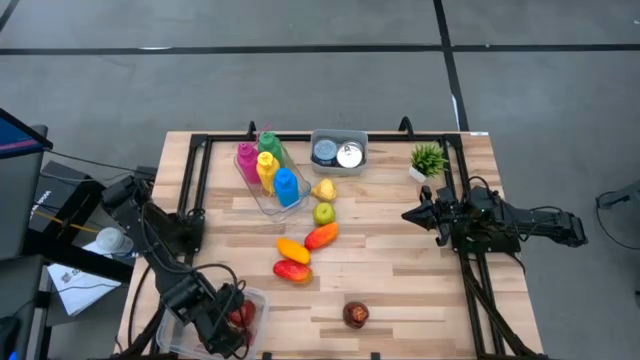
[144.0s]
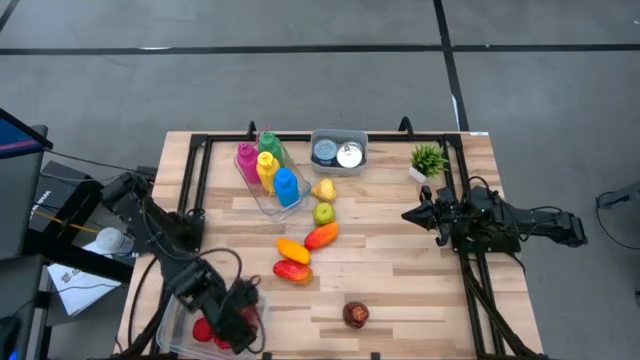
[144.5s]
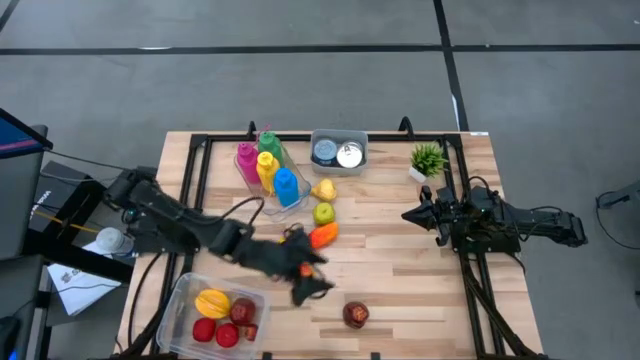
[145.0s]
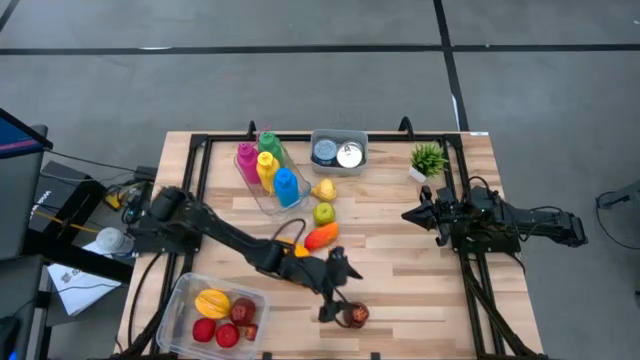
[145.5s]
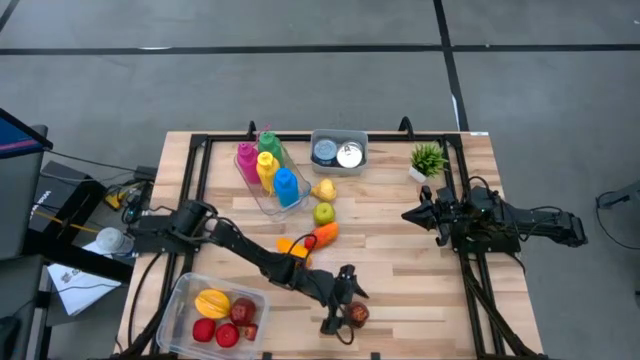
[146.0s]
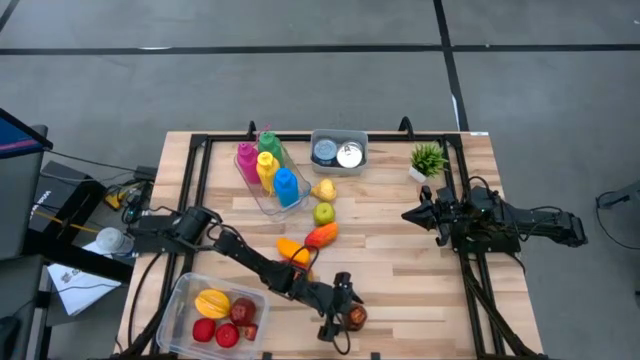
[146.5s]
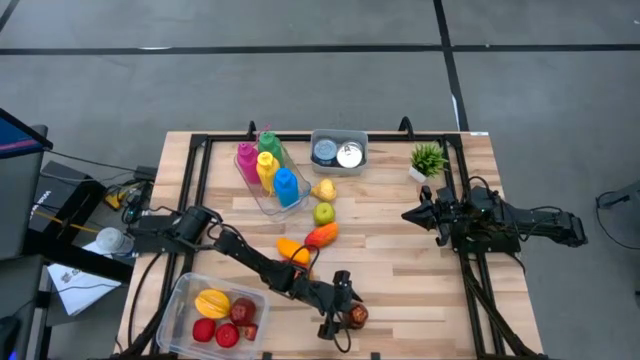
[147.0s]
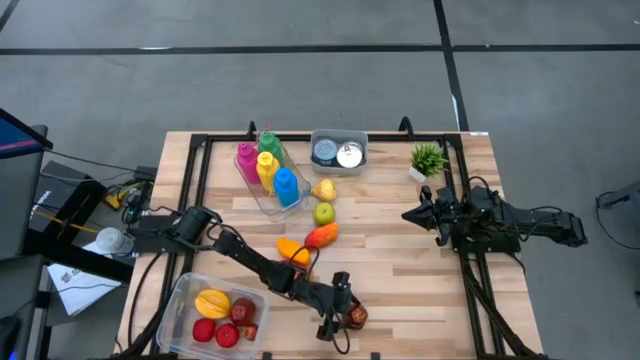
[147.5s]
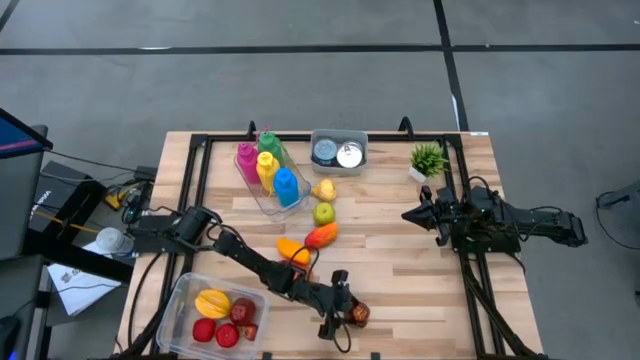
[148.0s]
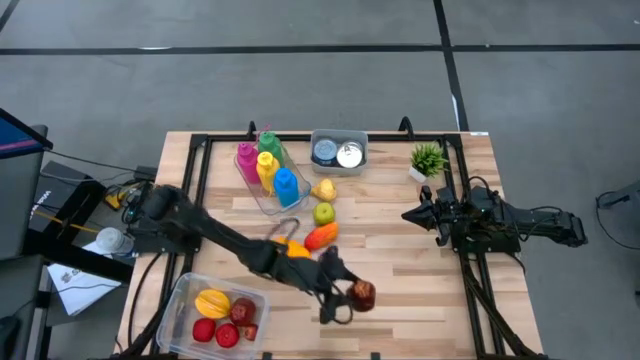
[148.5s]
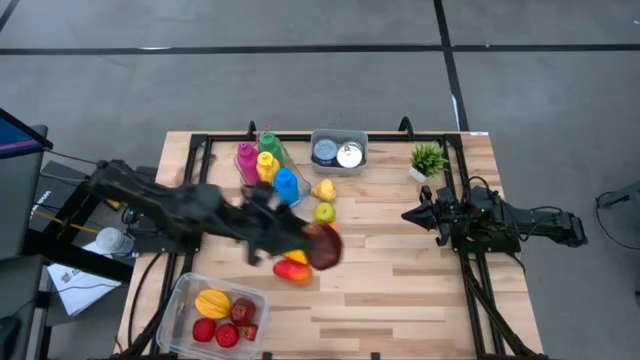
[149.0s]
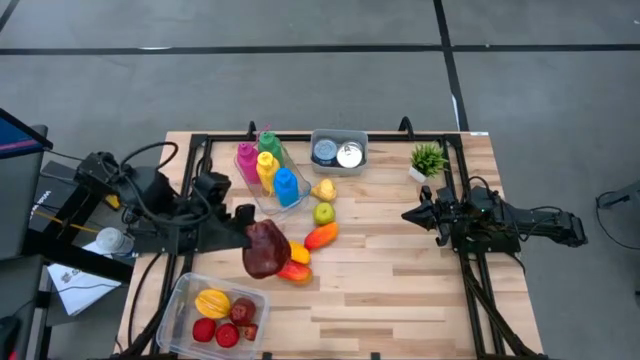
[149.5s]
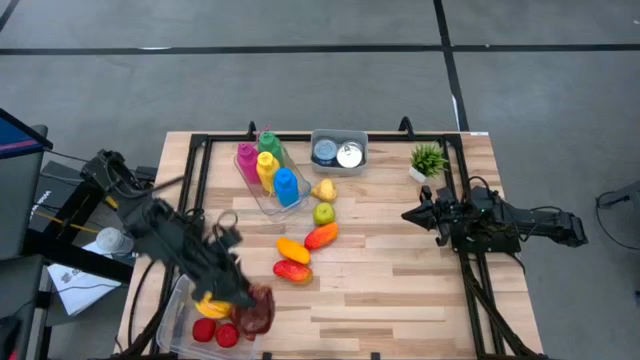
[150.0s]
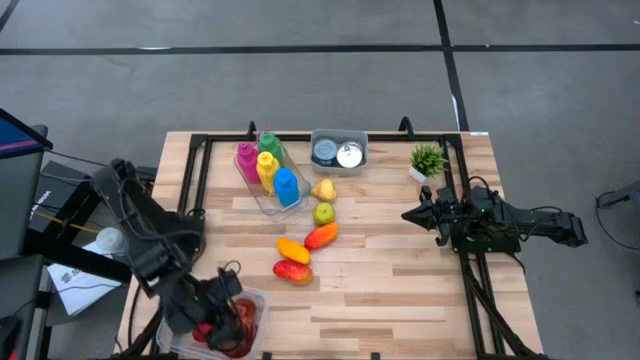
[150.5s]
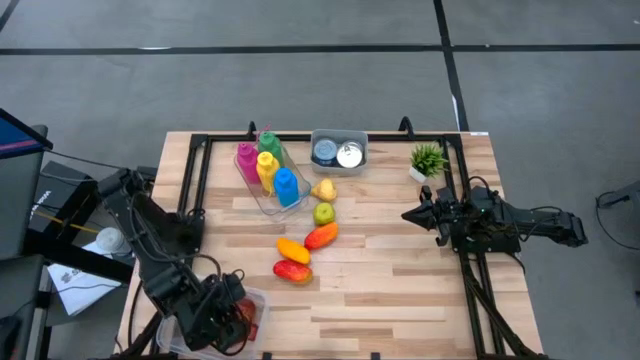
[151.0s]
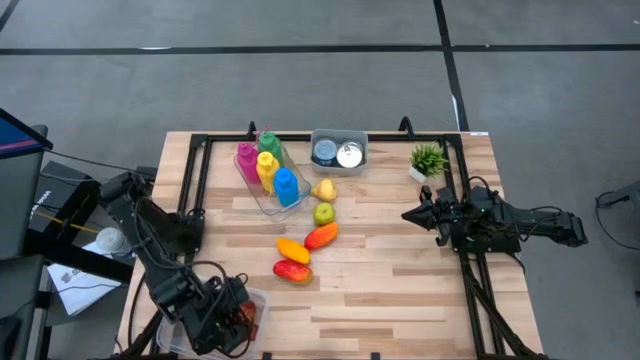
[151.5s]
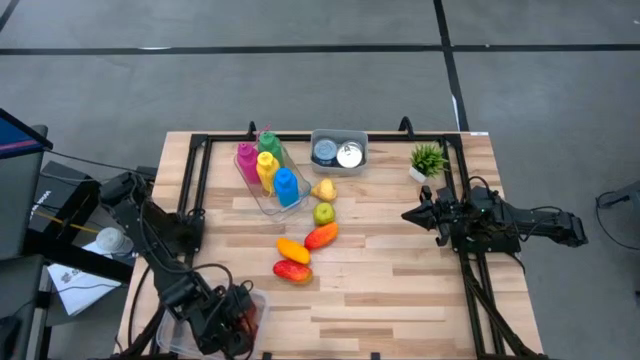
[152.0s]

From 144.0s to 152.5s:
Task: Pick & Place Food Item
Put the red apple into the white bin

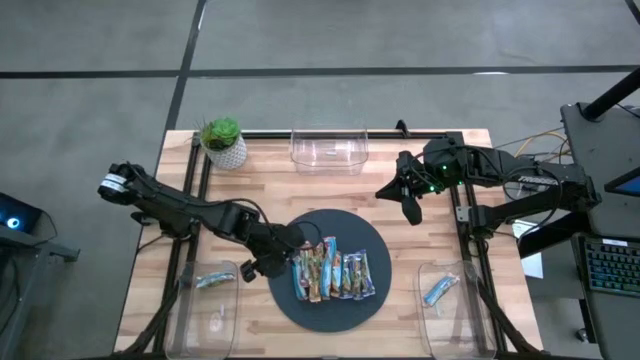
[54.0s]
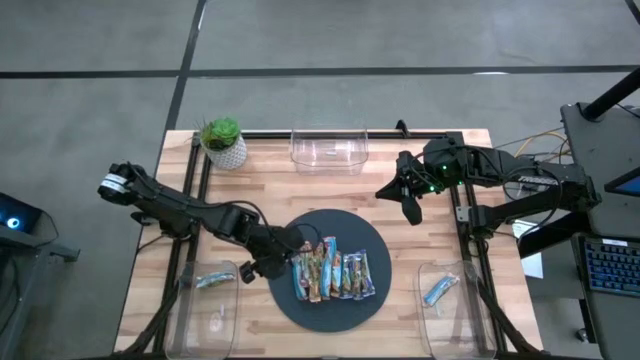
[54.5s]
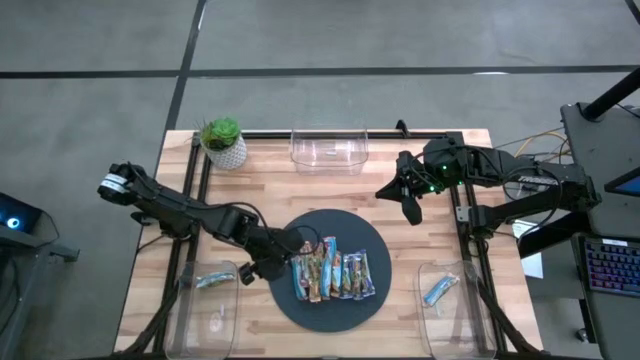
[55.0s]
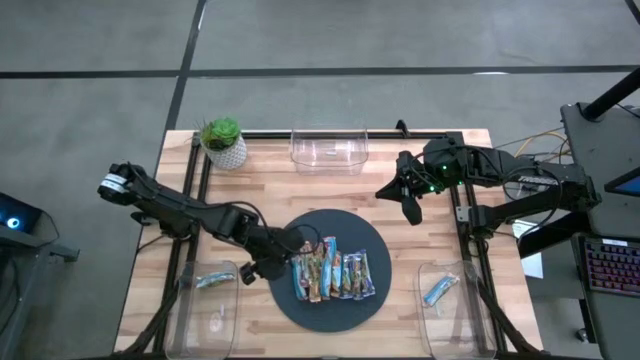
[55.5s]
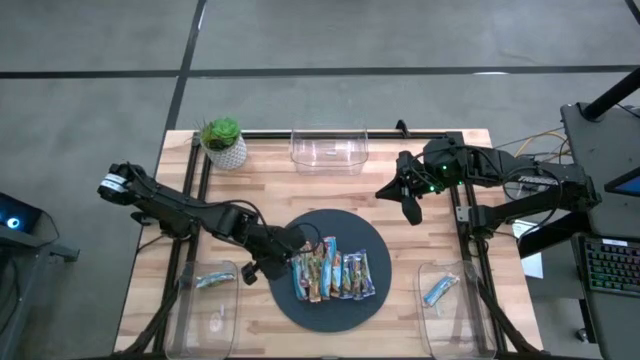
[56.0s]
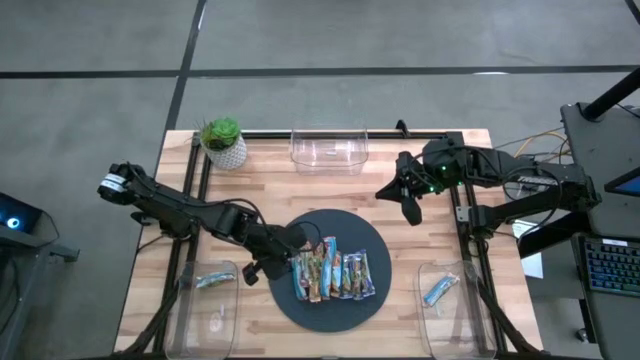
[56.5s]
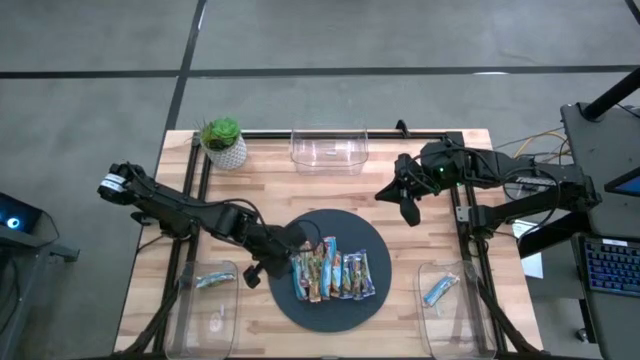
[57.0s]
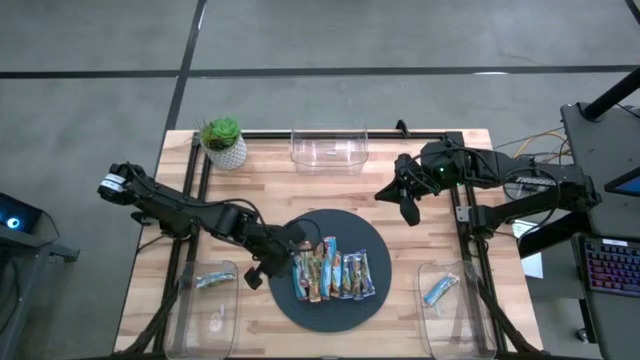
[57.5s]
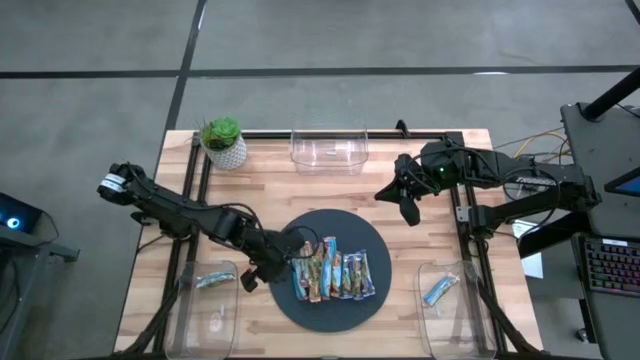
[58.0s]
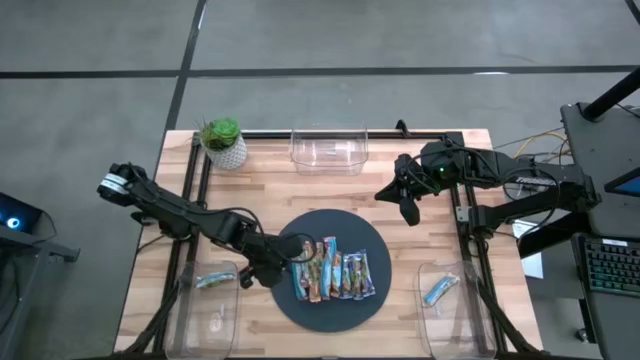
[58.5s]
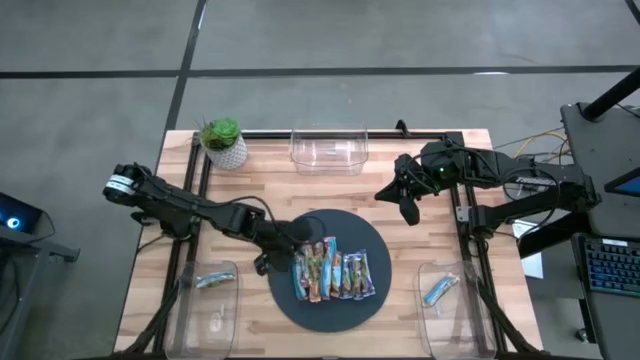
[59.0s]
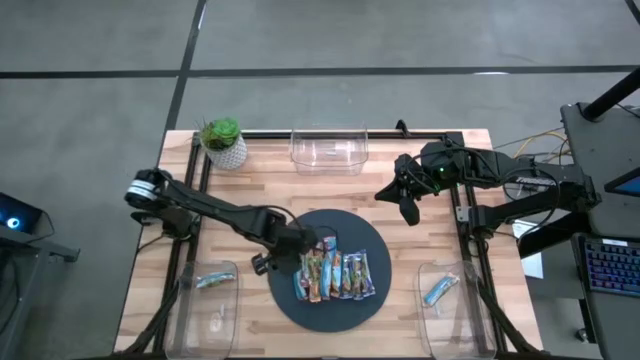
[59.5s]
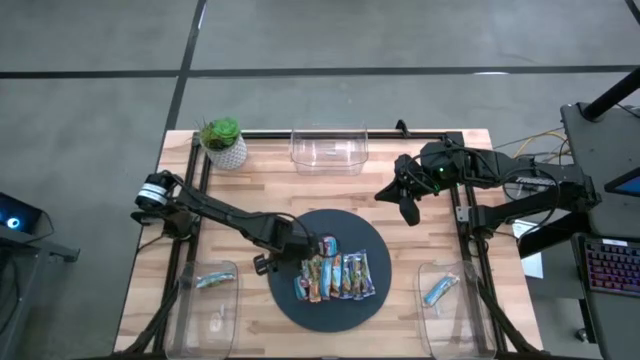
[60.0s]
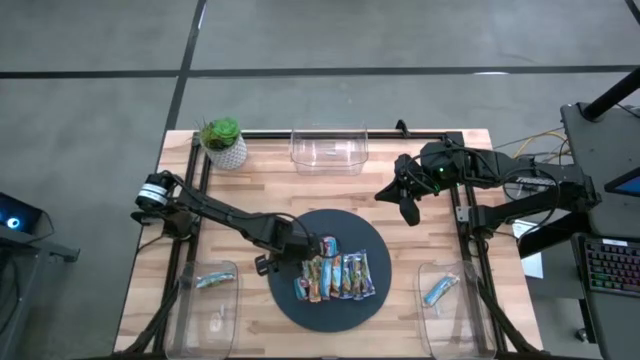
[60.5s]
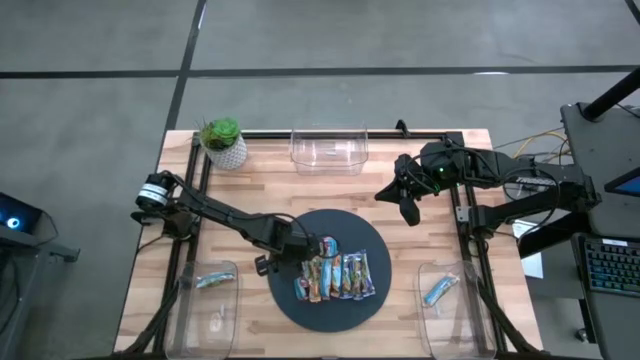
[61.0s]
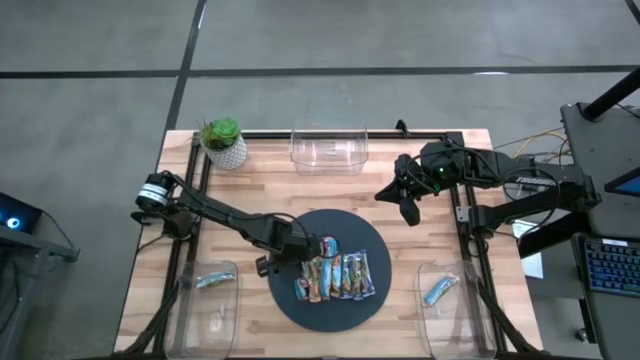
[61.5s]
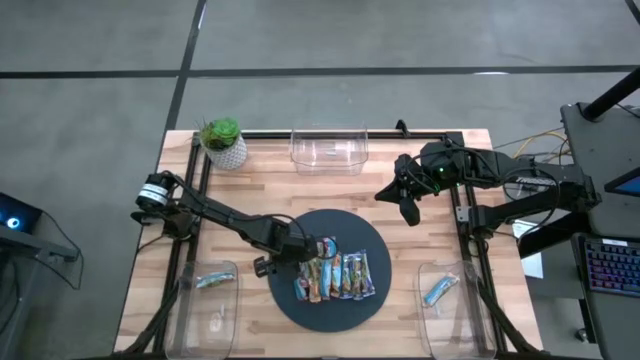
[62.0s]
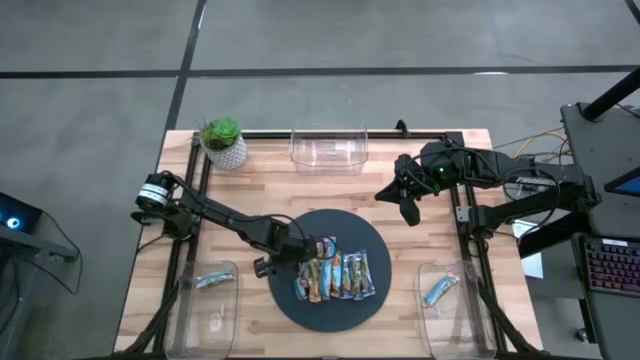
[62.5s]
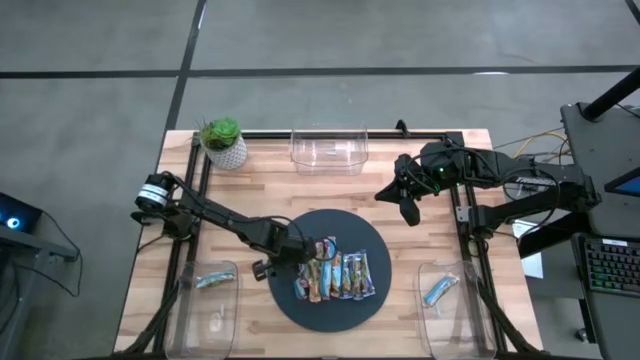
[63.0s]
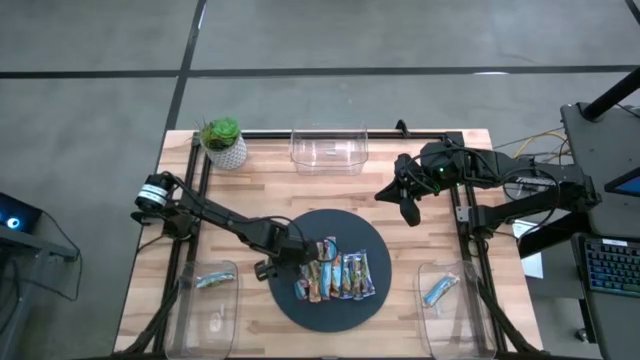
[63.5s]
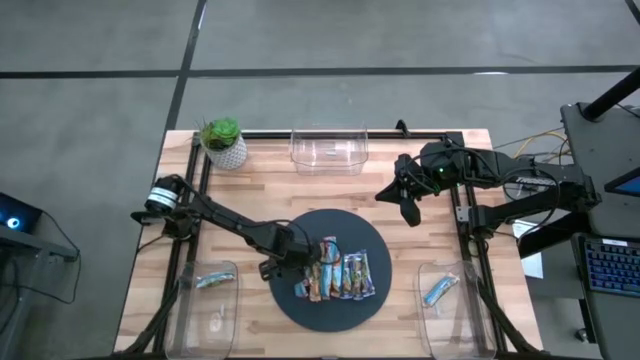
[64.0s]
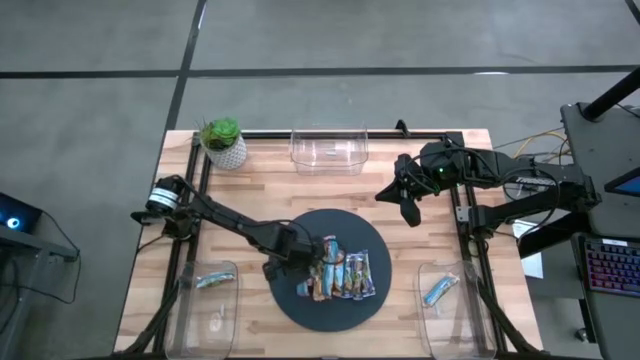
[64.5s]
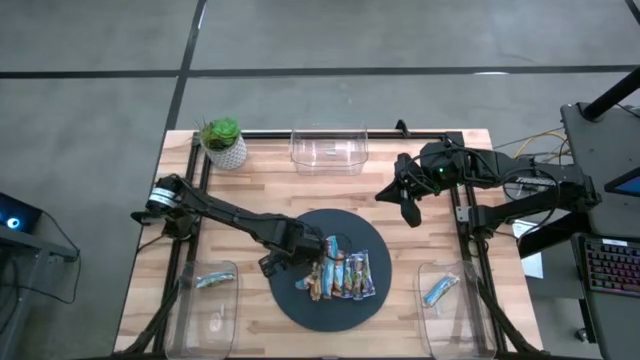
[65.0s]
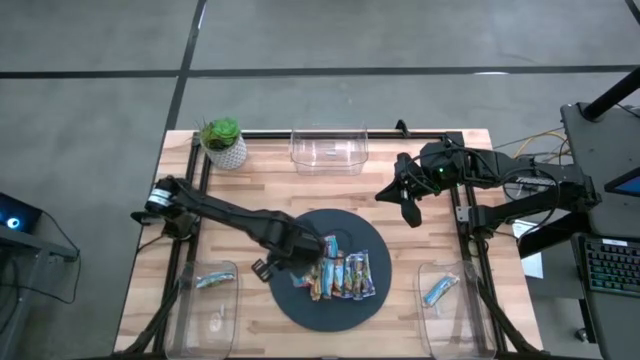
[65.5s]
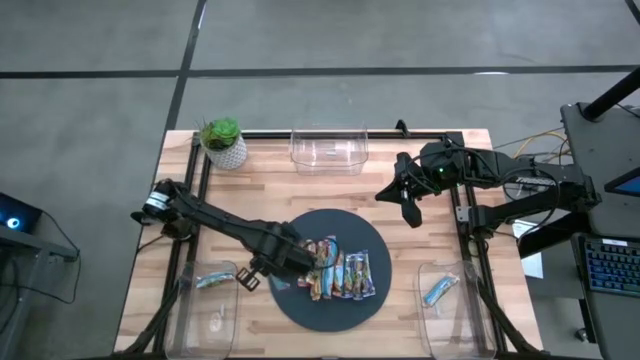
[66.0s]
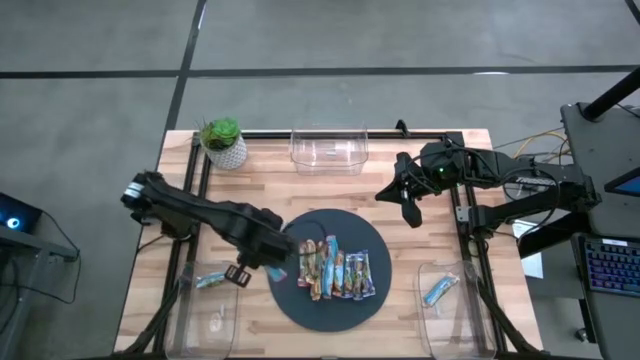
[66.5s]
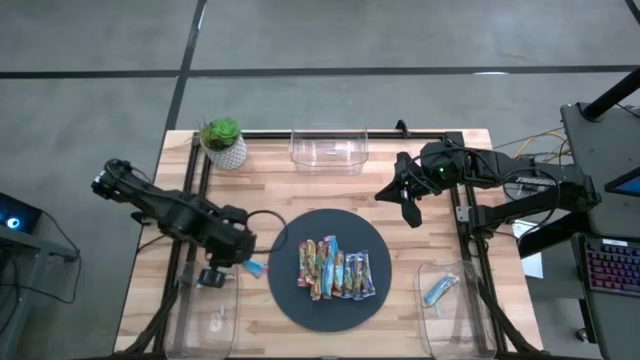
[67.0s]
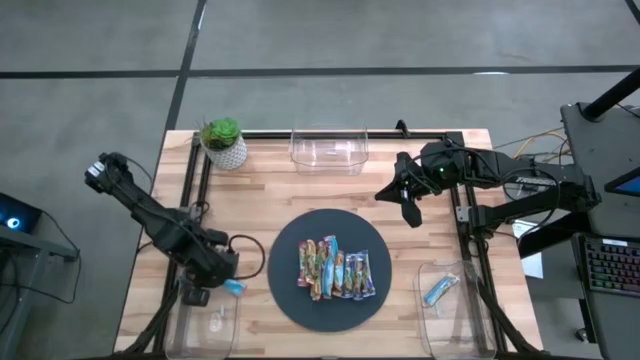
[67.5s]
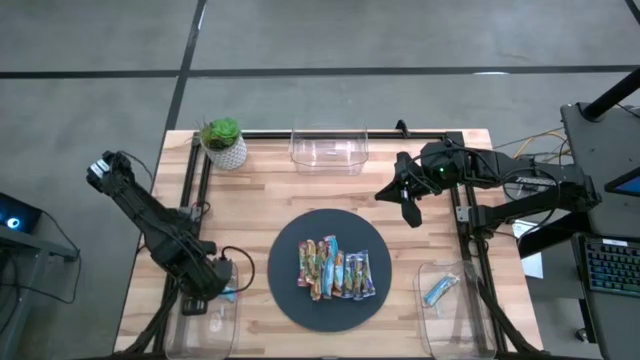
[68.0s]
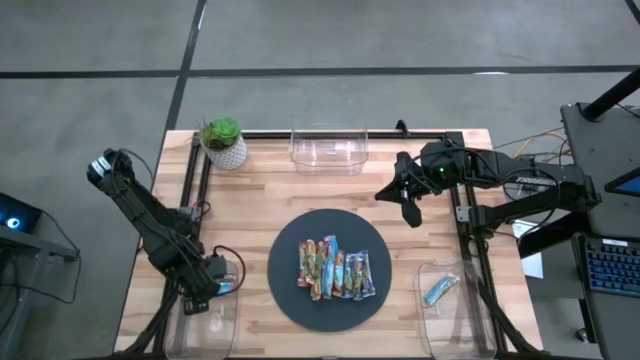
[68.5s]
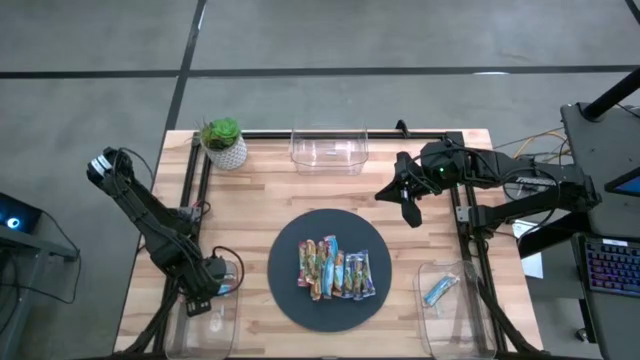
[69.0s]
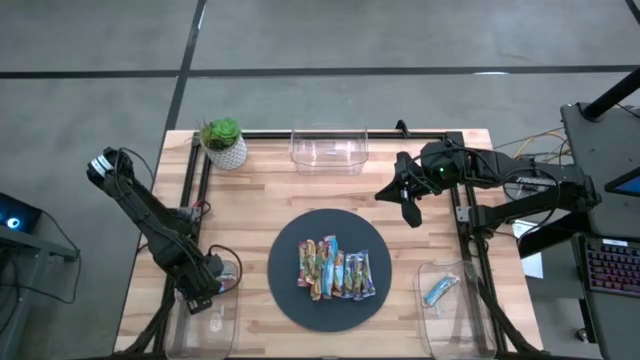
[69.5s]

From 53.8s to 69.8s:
Task: Pick and place Granola Bars by type
Put the red granola bar into the bottom left transparent bin
